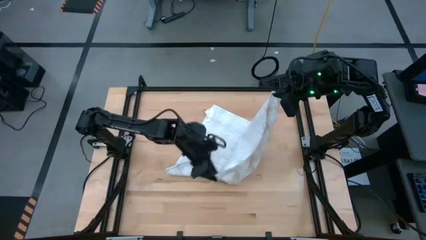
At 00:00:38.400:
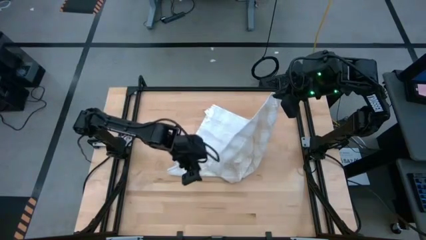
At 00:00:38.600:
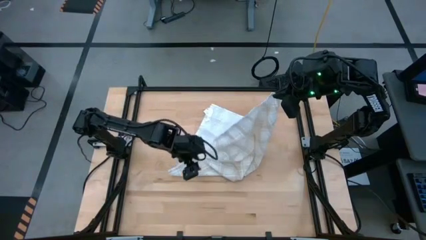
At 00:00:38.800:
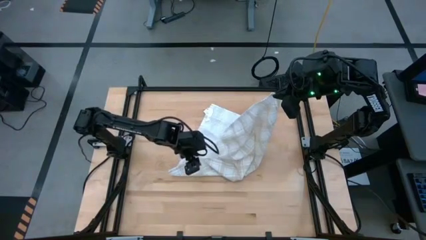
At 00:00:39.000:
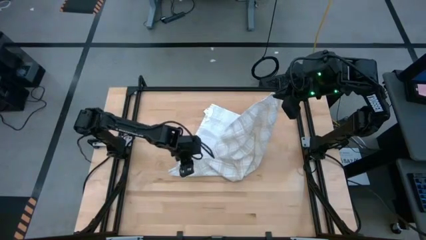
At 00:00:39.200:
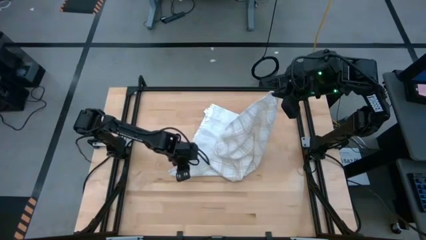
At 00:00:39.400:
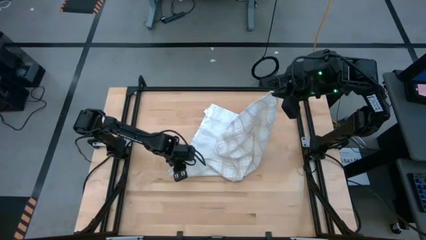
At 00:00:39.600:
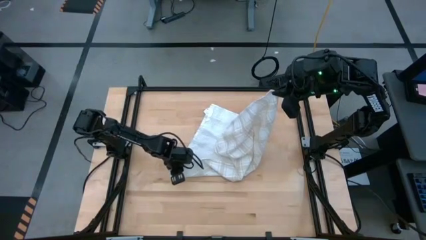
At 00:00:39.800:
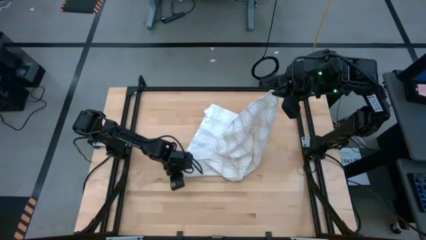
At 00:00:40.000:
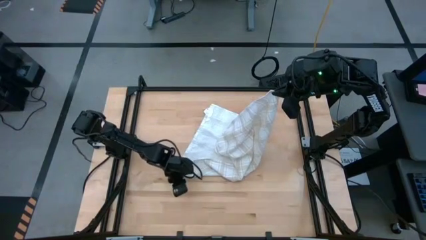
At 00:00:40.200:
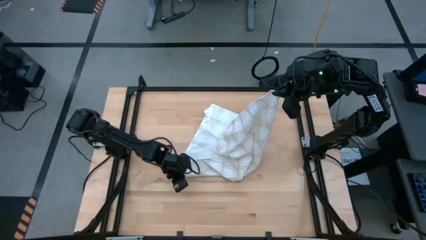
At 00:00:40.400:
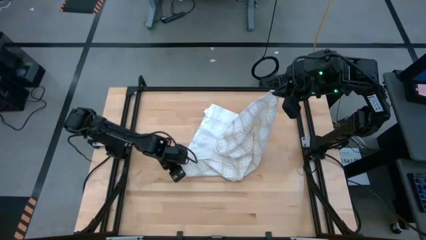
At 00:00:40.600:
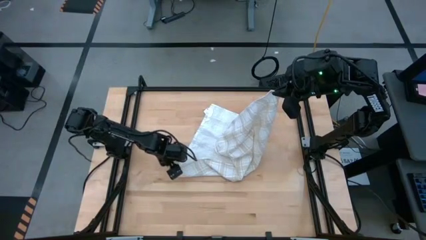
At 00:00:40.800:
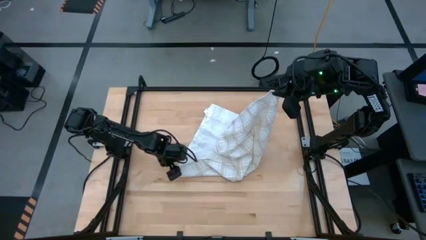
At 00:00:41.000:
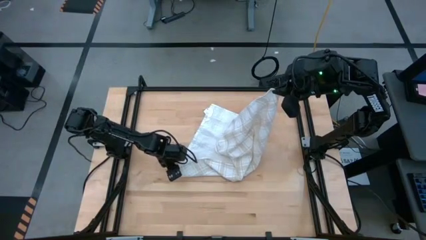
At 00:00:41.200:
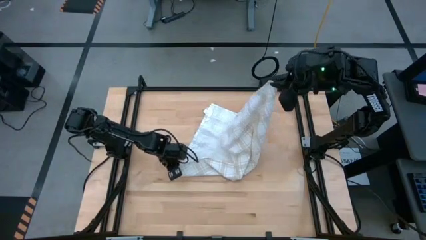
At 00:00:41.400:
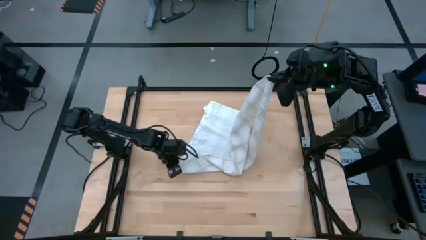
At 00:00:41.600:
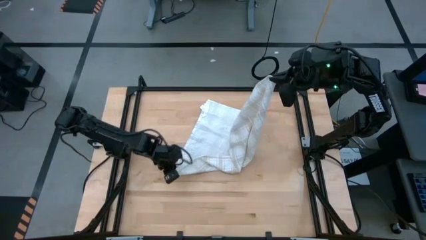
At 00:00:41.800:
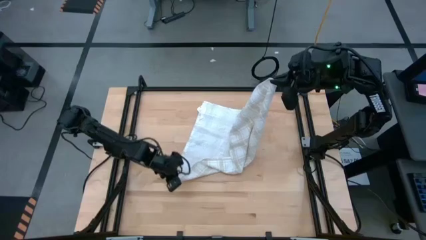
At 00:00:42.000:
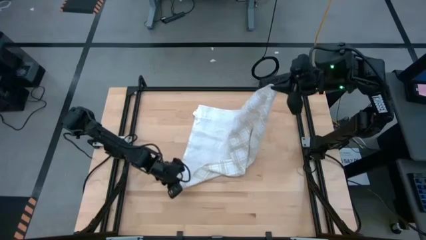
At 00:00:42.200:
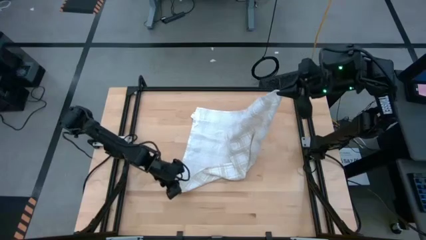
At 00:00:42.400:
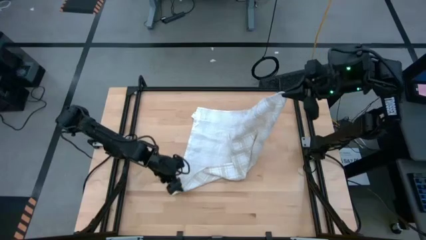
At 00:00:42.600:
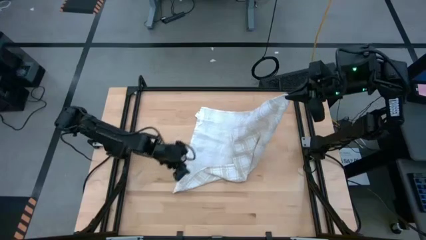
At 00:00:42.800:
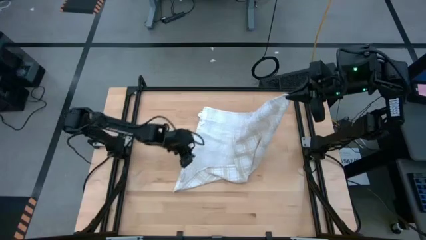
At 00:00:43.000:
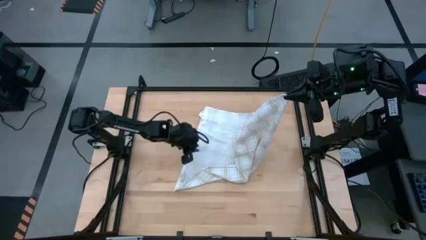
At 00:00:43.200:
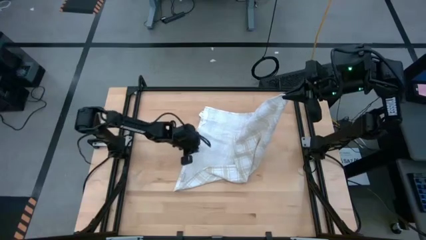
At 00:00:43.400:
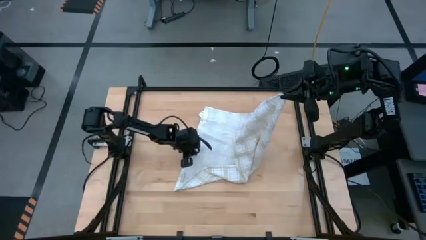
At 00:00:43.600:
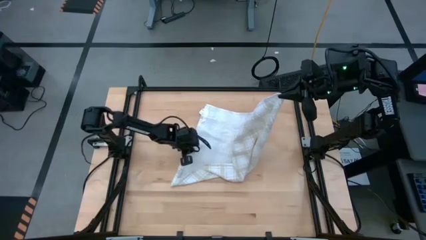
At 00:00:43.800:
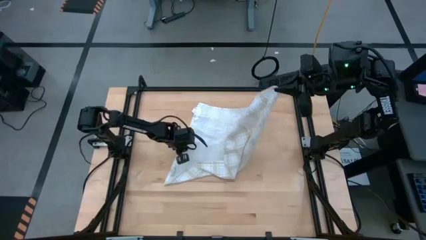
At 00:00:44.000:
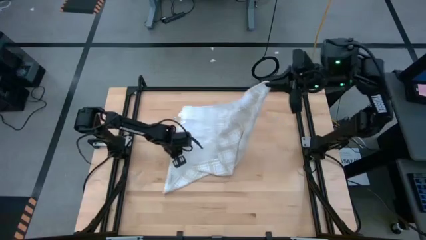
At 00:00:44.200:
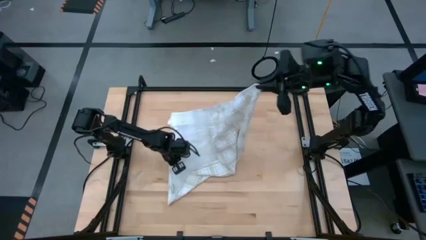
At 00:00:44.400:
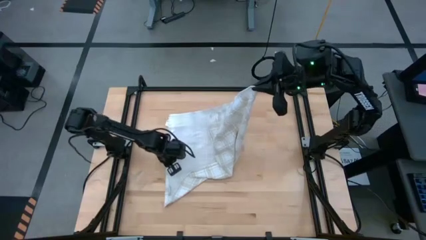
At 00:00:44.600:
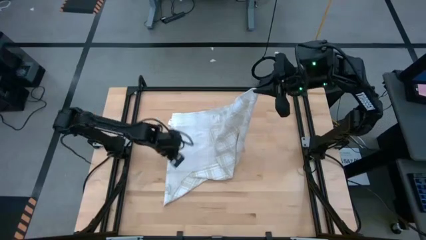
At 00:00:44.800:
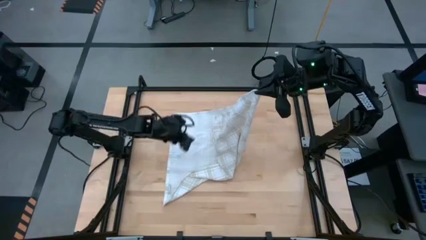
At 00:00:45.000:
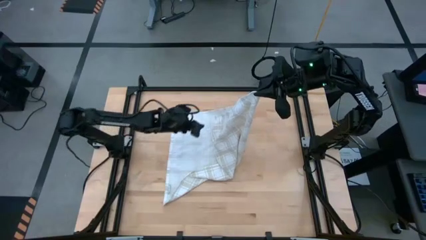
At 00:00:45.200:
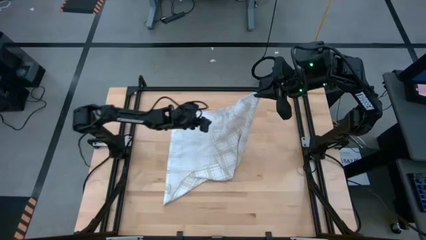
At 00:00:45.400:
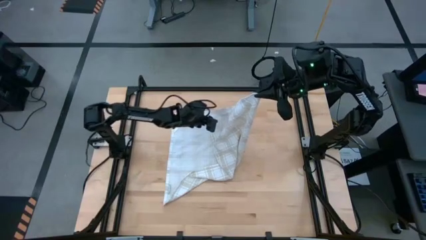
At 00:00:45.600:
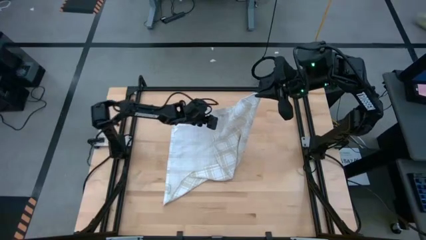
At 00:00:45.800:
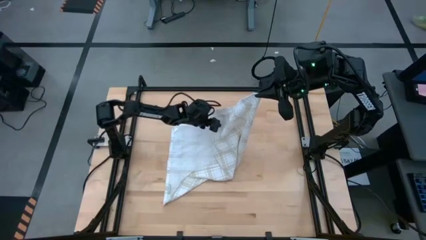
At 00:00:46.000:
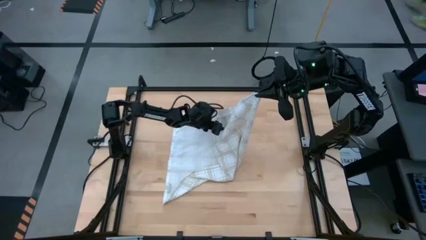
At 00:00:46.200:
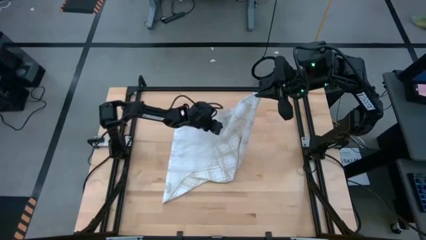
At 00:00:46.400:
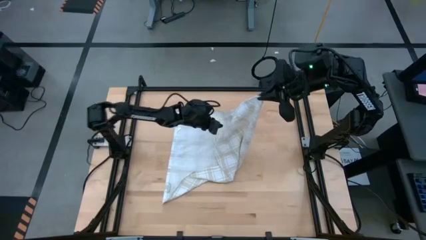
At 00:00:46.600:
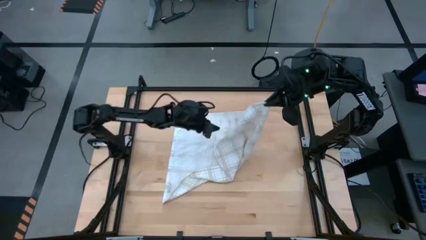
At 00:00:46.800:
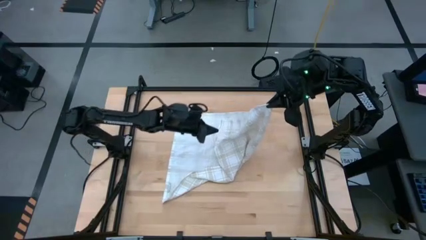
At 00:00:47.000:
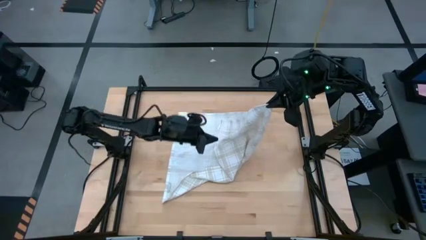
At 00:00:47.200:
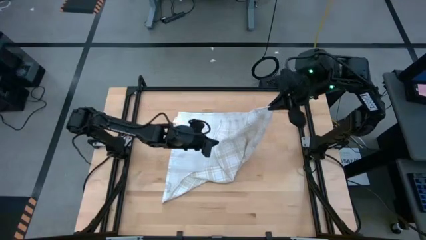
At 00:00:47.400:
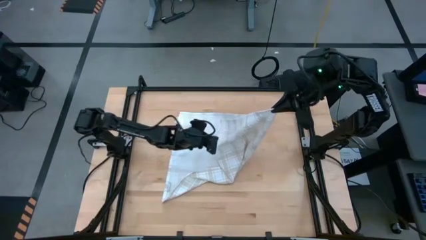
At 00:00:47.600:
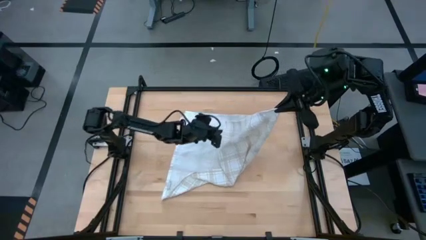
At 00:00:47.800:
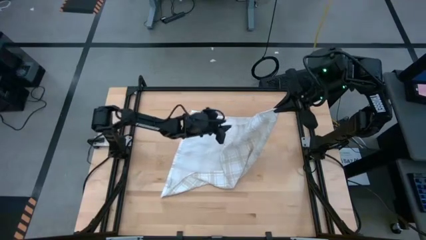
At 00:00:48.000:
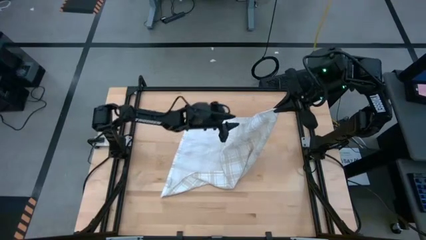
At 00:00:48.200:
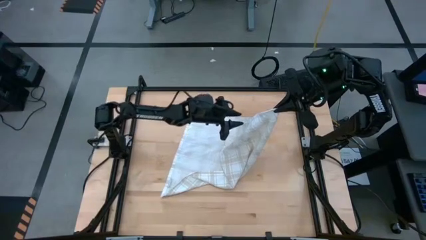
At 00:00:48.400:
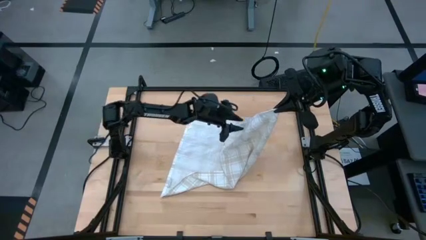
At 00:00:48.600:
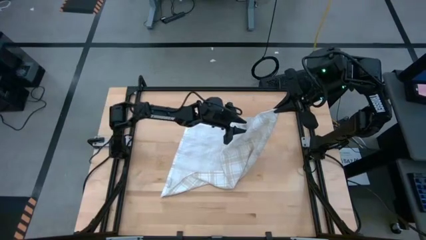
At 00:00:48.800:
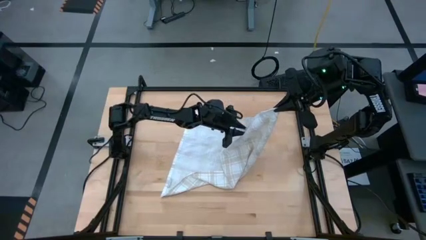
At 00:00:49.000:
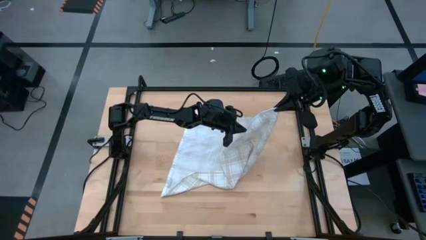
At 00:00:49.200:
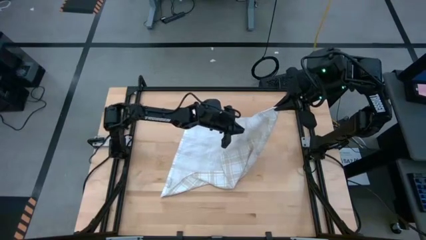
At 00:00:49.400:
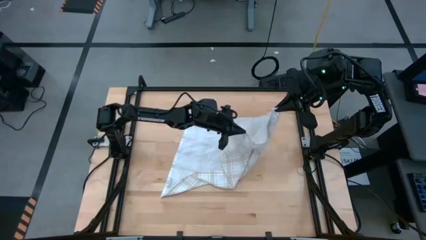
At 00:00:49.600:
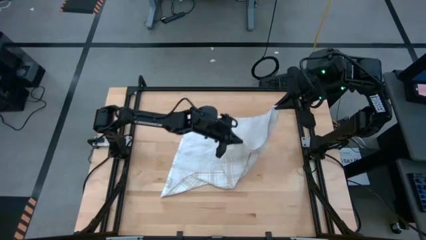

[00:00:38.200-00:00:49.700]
Task: Roll towel
Roll the towel

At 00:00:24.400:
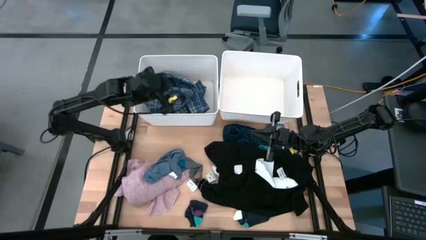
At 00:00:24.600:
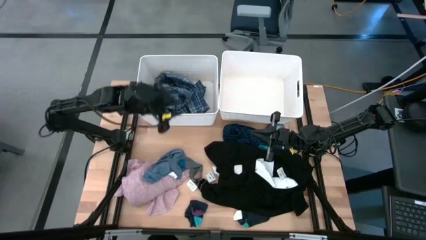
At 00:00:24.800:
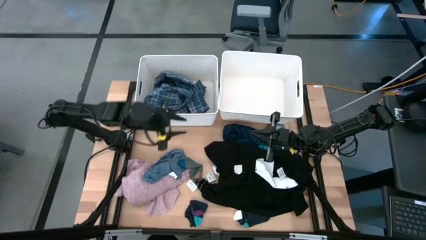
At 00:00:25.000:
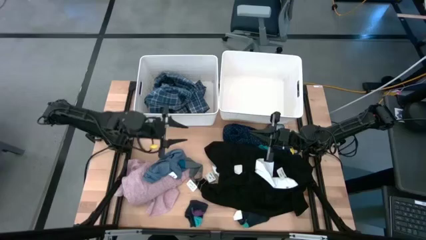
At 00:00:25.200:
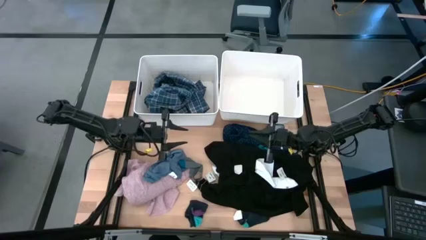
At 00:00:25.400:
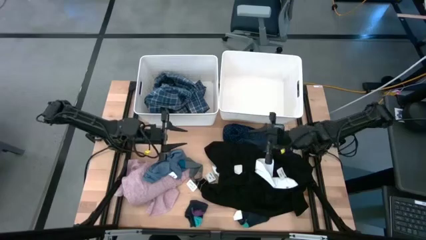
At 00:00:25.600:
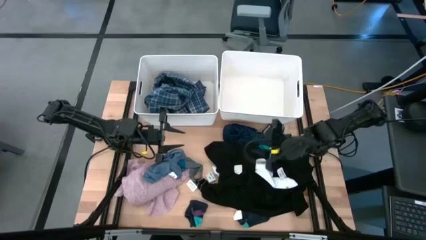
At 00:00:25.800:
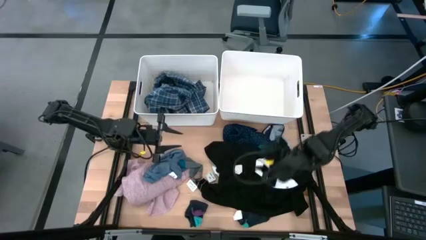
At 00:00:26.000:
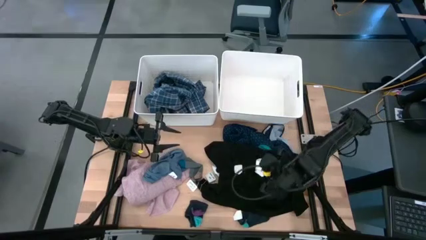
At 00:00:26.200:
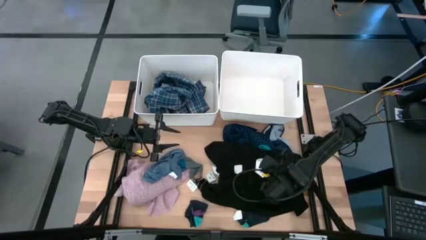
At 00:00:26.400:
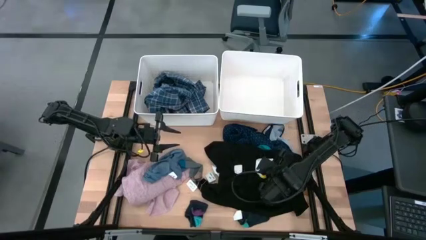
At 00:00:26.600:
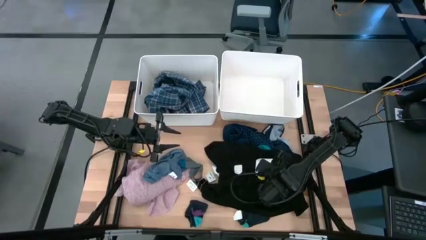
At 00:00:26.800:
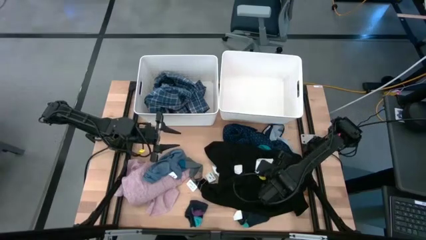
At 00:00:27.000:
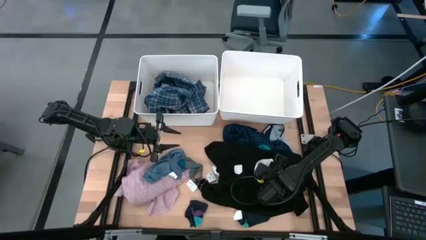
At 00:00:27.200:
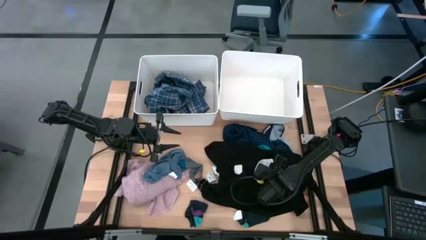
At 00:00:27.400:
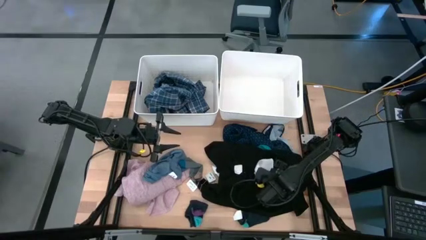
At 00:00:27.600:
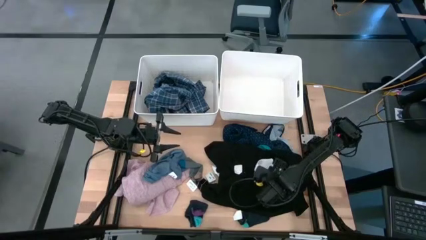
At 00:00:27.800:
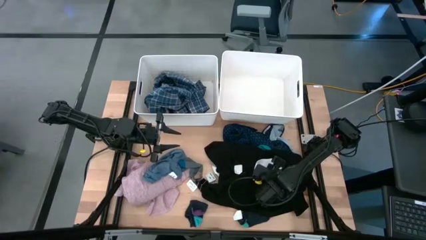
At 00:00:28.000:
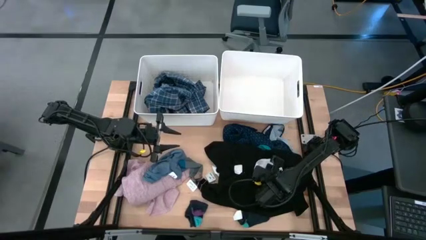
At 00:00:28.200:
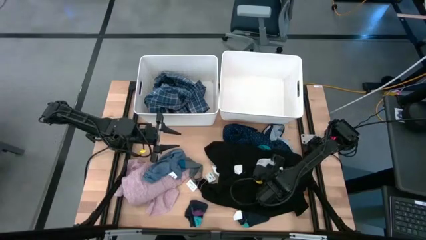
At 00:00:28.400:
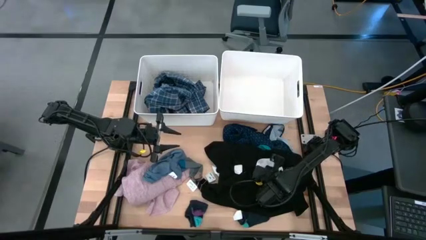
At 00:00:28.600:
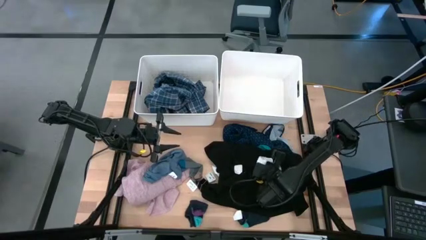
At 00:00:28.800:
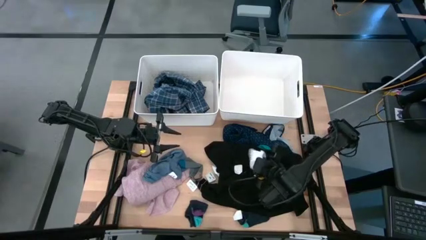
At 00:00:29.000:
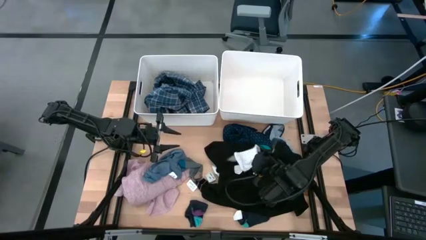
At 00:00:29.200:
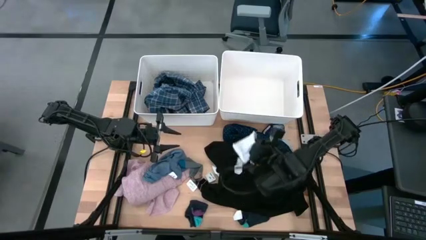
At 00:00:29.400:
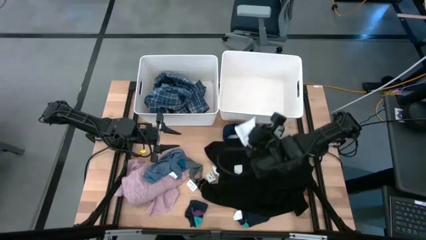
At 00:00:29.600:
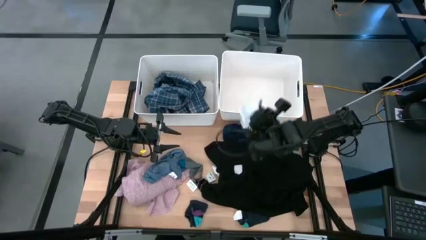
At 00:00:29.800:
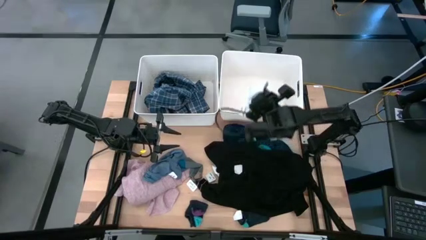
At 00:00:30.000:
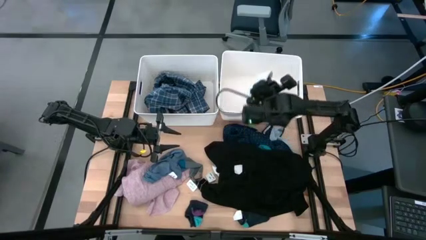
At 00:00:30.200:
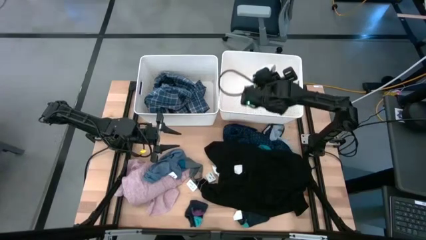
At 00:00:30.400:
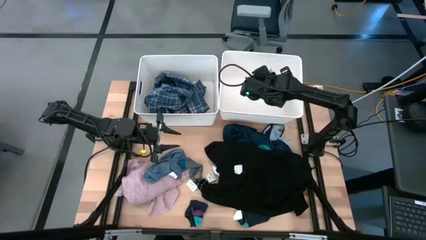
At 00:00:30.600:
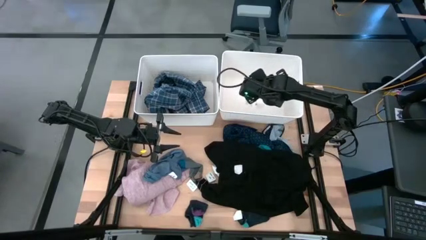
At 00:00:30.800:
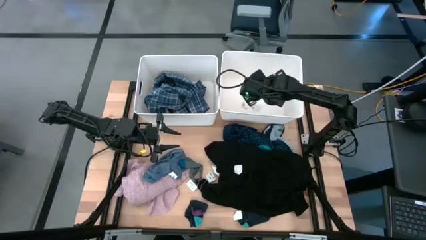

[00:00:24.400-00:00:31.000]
Task: Sort clothes
Put the white sock into the right white bin
